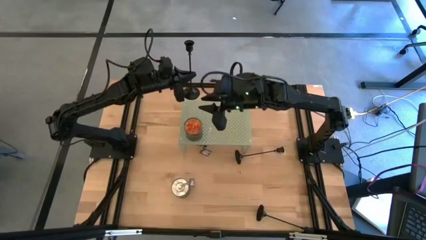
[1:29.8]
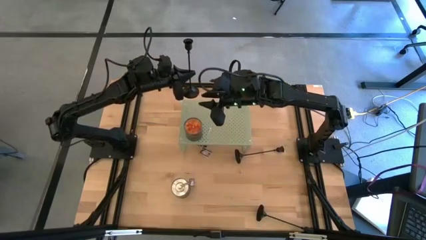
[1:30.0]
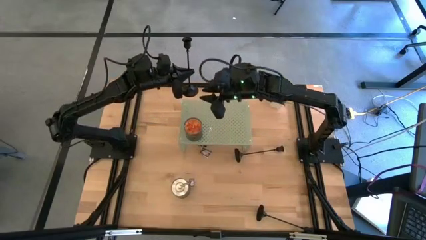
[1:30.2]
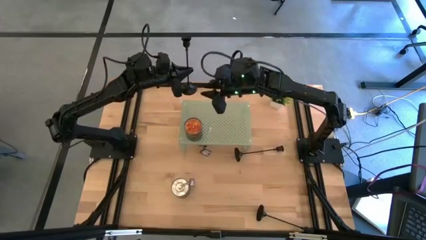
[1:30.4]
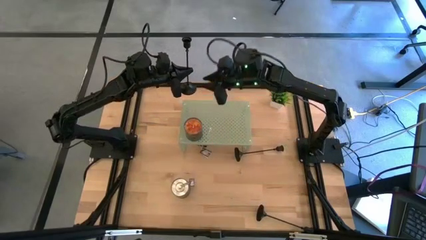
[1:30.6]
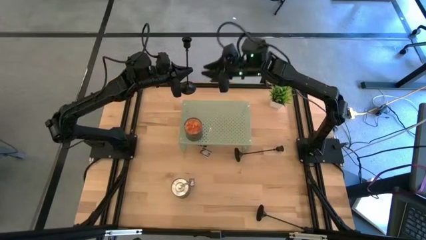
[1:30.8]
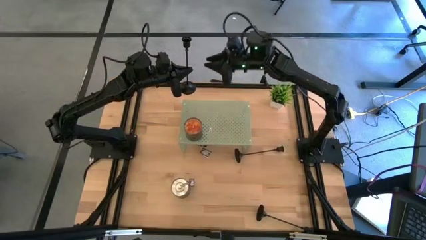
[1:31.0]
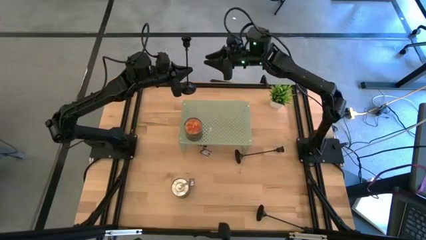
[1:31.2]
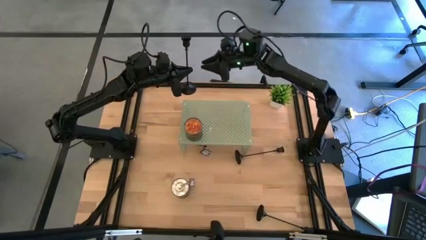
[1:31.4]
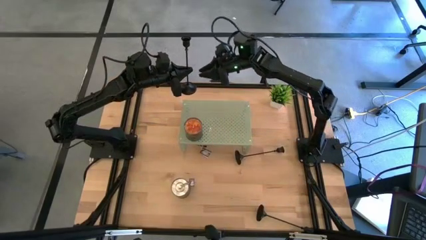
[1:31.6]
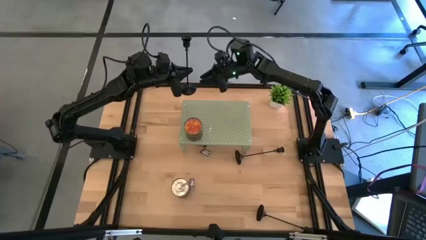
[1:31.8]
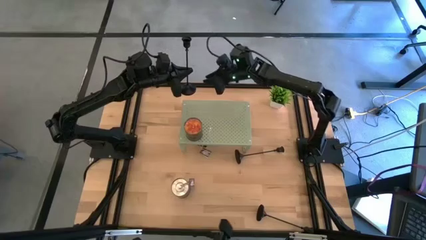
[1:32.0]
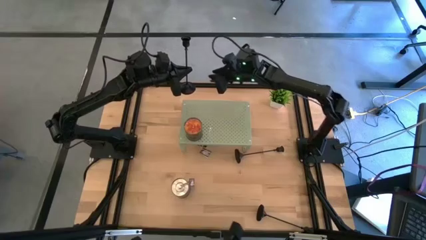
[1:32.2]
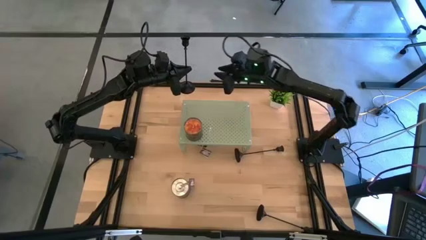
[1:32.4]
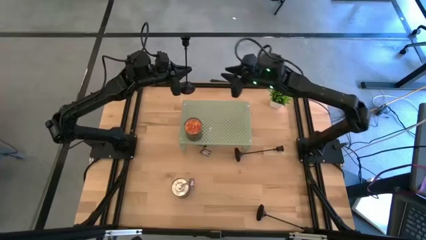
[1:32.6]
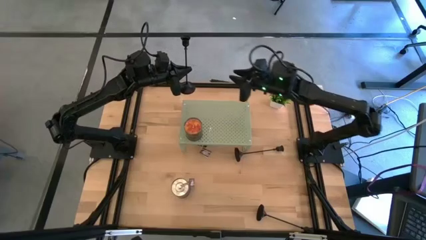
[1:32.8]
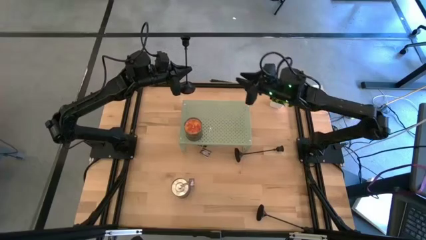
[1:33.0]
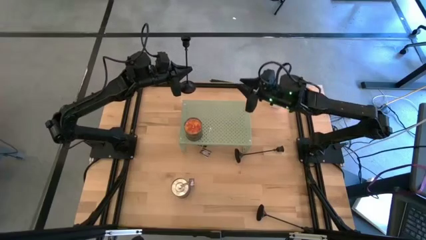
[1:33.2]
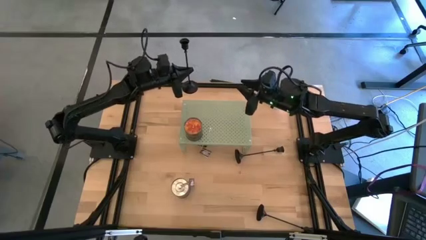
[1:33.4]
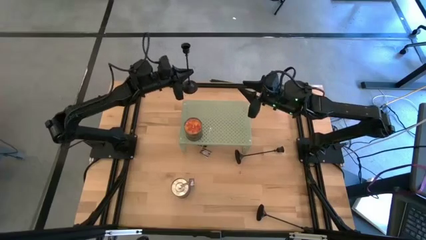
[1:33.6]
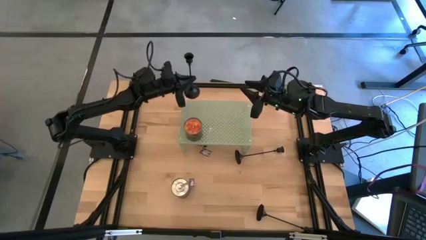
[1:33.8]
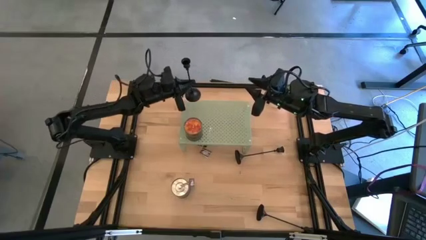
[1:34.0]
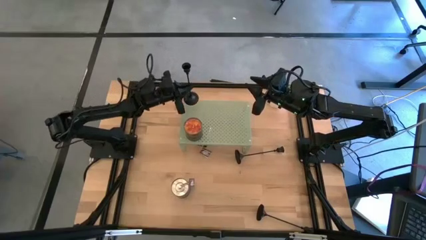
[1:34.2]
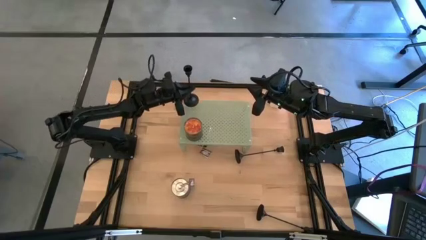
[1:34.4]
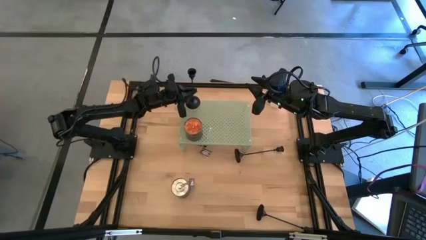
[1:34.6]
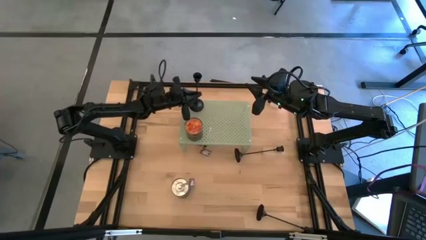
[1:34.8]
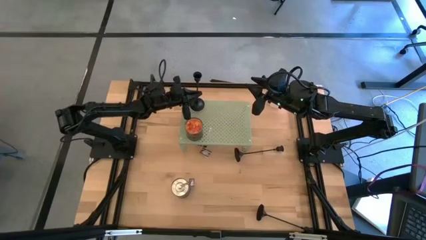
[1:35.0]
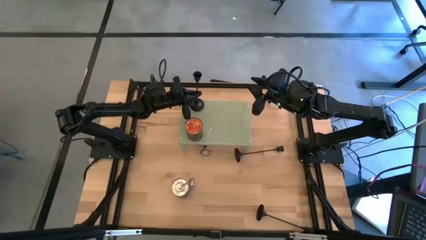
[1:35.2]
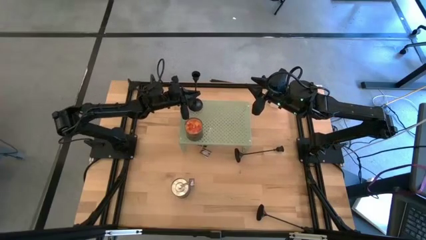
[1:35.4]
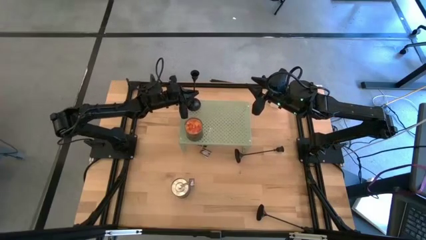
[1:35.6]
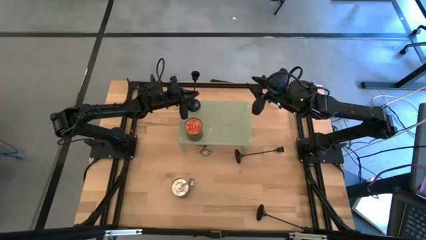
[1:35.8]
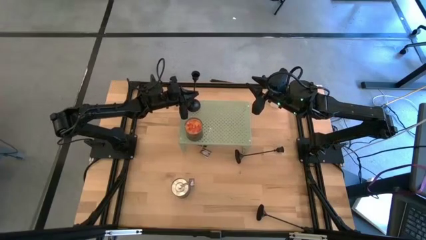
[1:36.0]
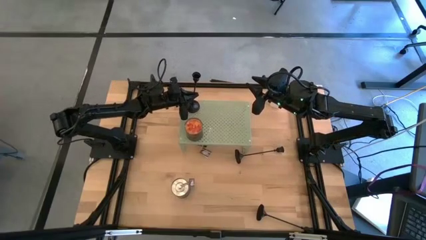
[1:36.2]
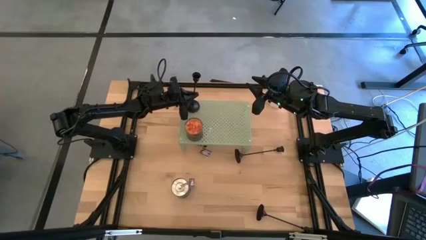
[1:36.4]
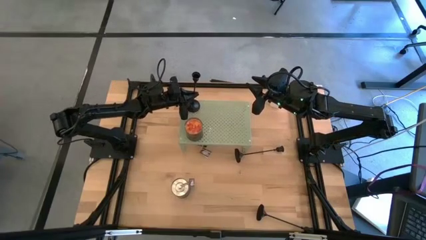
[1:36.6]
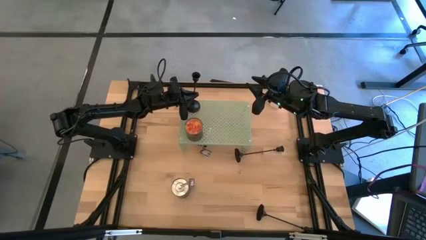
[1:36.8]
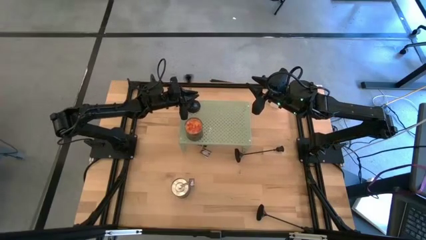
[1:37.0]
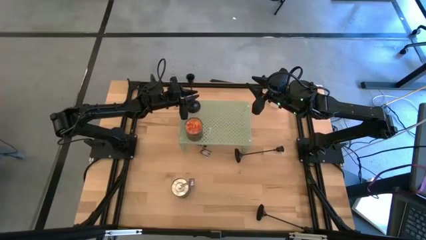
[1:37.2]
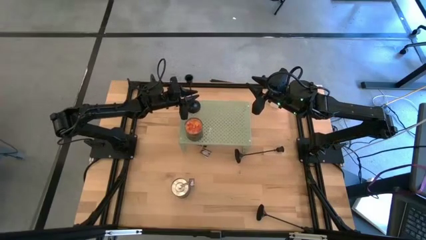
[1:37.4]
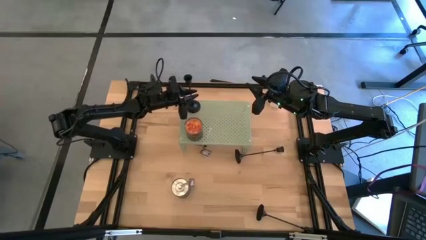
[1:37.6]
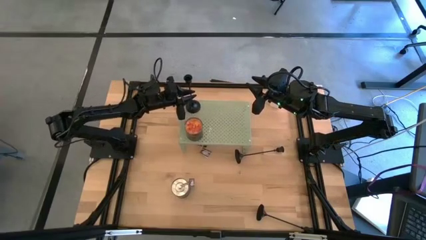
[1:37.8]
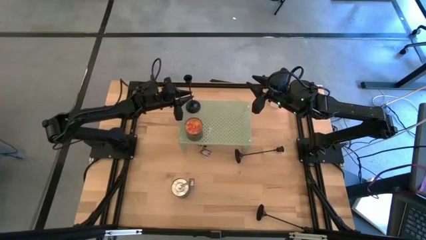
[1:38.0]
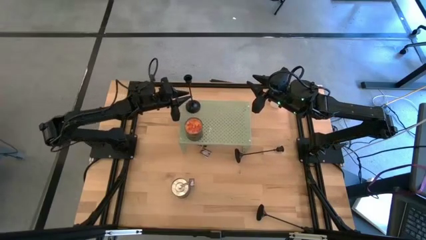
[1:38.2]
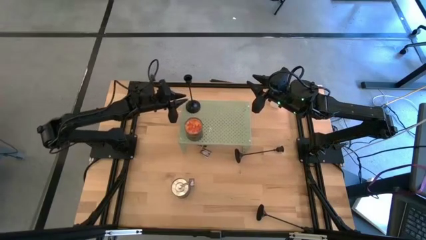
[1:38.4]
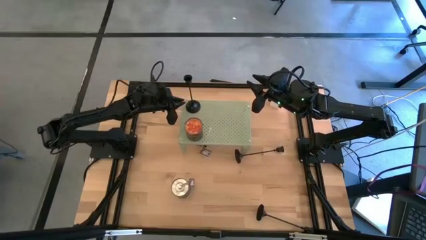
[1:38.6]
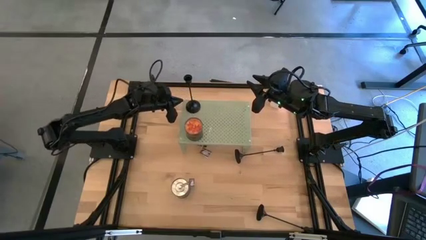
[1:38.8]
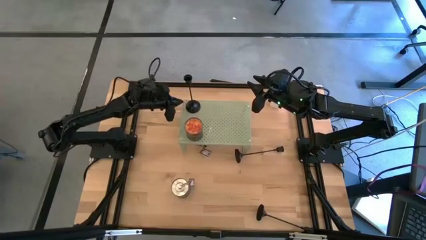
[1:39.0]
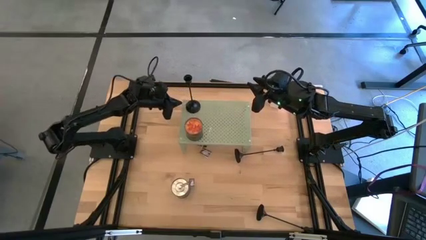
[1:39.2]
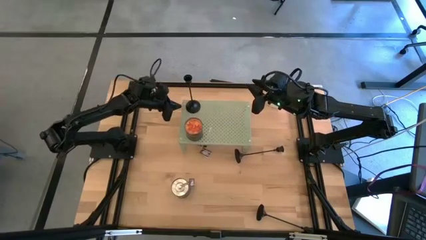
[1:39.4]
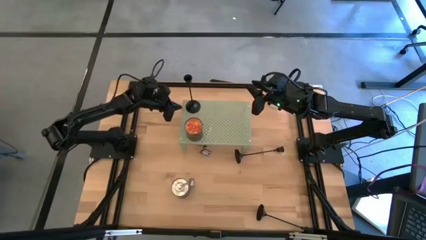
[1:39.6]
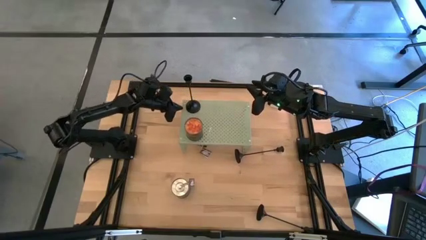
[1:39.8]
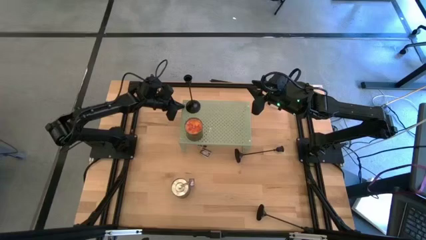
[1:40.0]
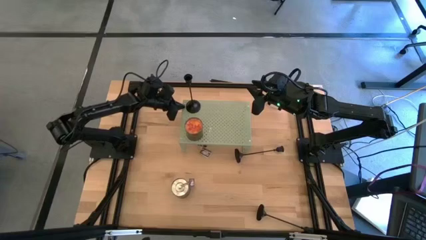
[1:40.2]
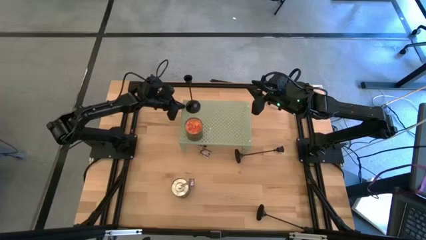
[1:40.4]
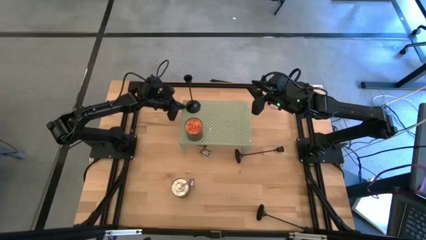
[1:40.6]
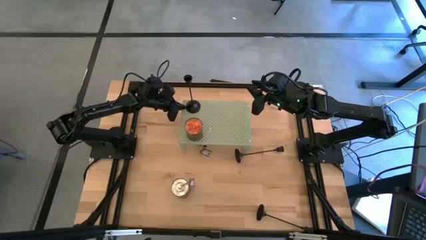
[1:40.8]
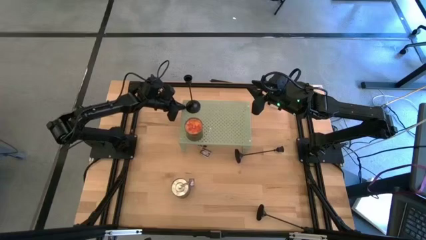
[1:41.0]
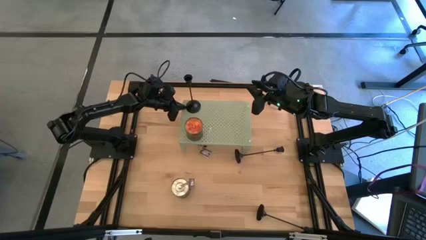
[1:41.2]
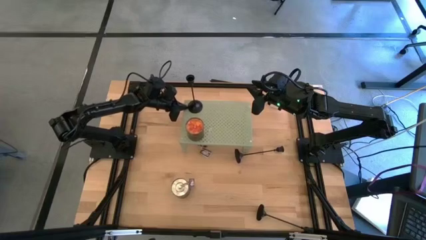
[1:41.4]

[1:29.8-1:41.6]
Task: Pick & Place candle stick holders
Put the top candle holder on the shelf

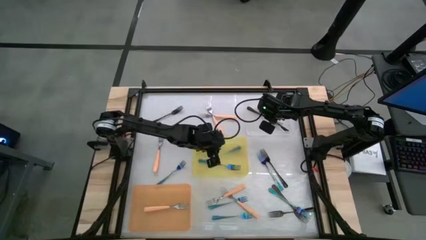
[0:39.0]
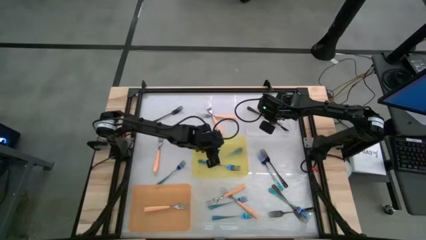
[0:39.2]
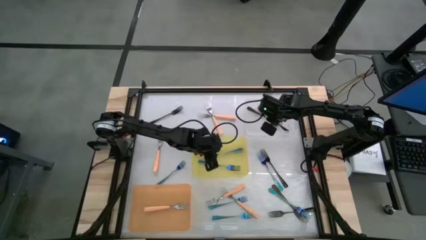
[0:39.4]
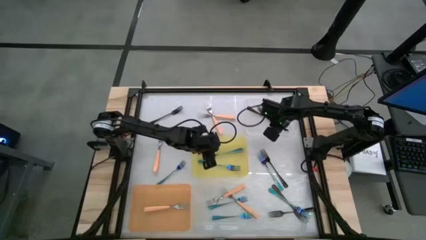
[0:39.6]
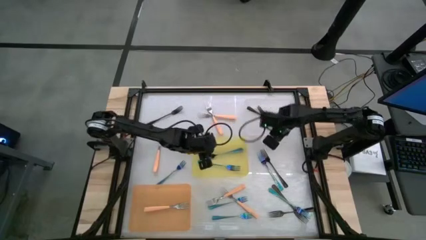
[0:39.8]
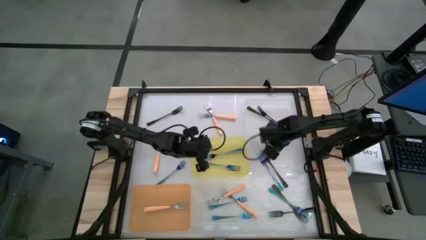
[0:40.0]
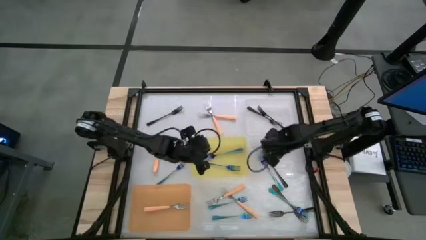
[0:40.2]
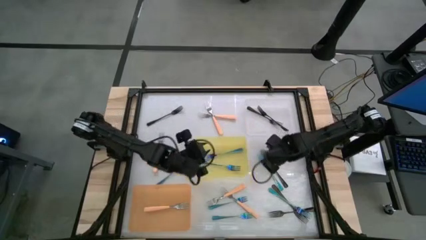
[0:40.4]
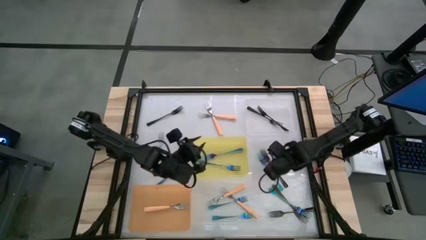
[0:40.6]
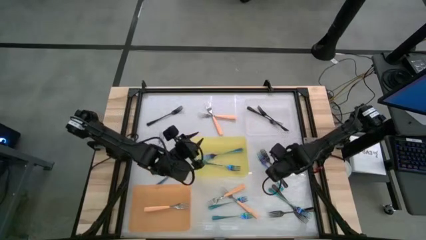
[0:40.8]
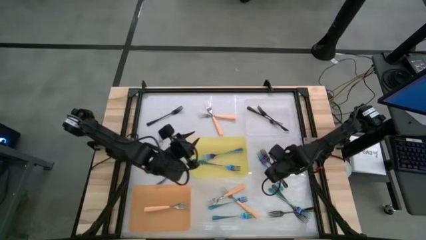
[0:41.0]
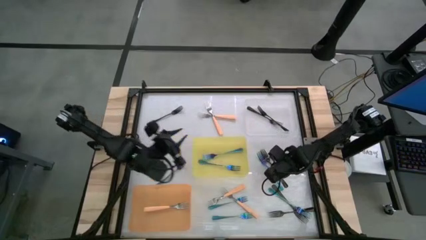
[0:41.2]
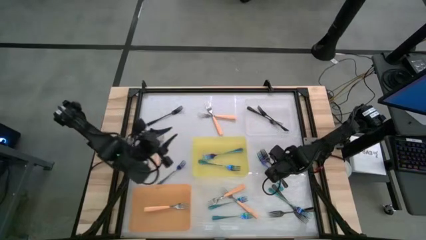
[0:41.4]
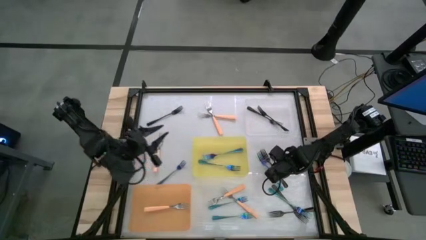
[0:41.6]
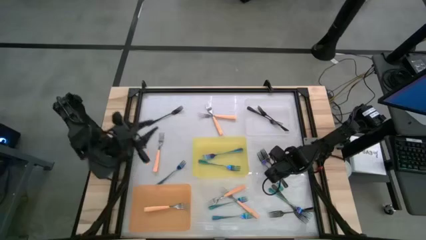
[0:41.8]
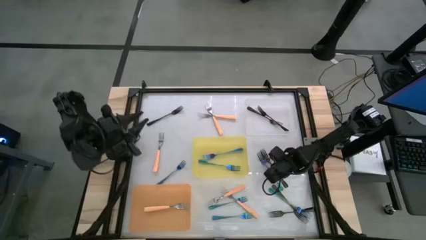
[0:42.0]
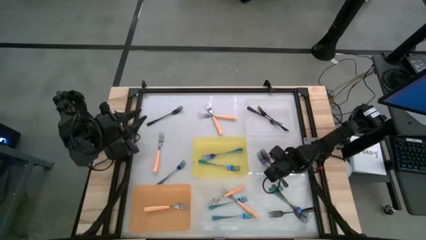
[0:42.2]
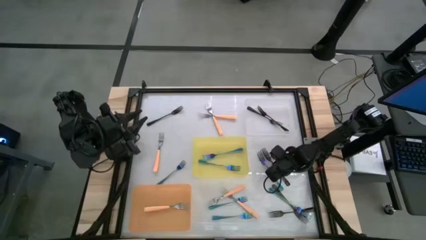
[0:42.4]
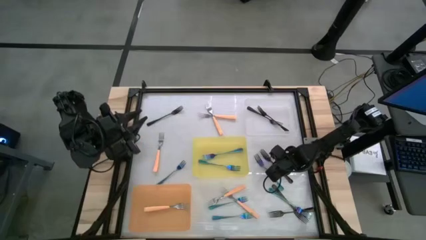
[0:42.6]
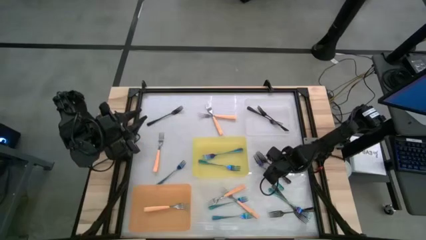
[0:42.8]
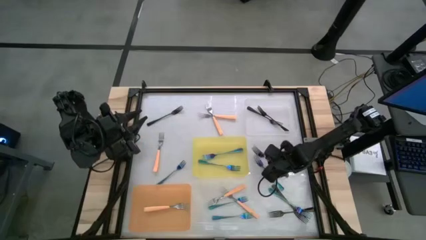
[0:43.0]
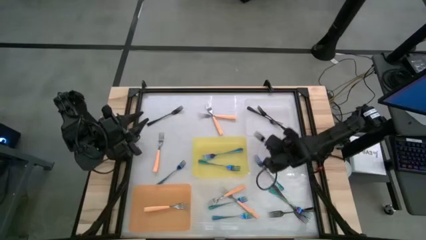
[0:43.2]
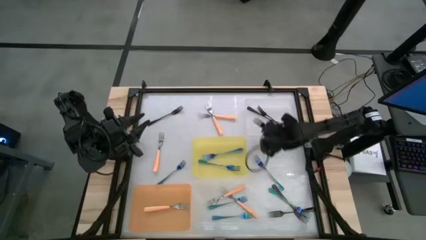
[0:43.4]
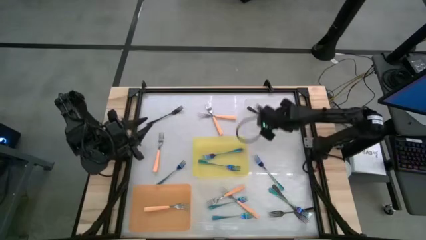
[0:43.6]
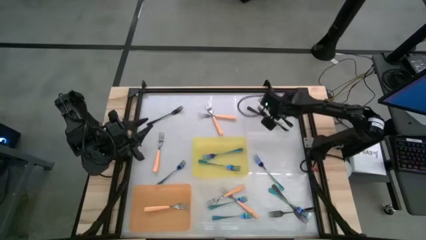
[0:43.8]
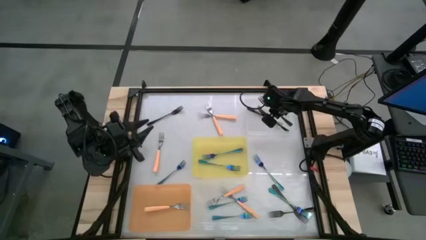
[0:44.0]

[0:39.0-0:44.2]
Task: Sort silverware by color (type)
Put the black fork into the transparent bin
